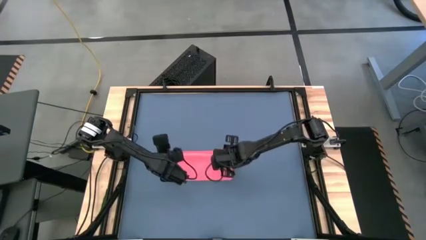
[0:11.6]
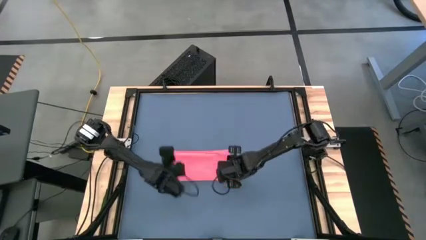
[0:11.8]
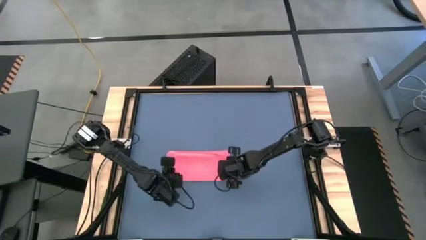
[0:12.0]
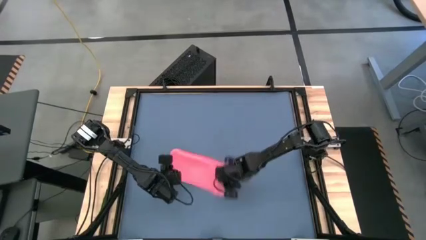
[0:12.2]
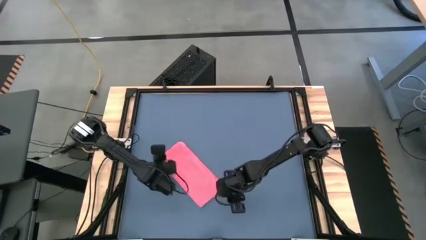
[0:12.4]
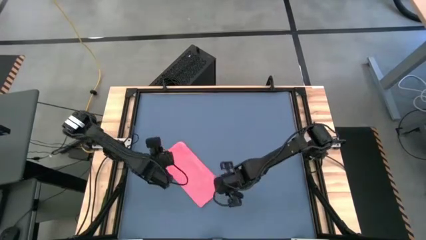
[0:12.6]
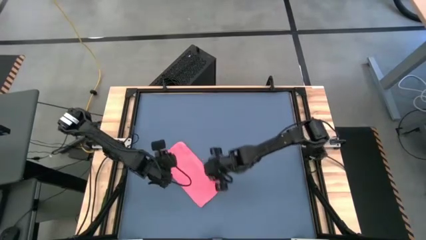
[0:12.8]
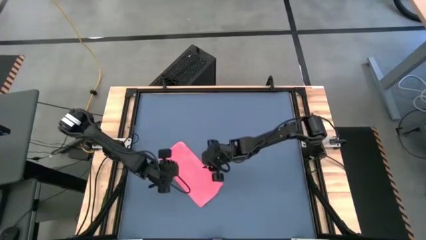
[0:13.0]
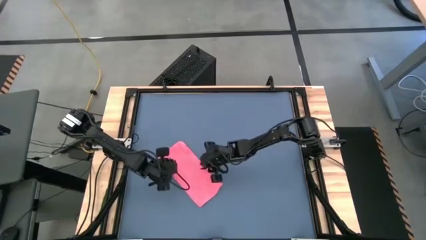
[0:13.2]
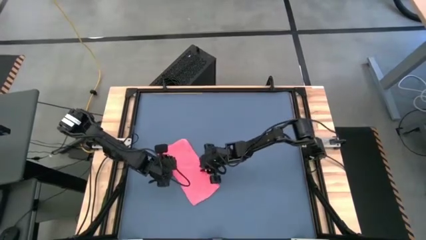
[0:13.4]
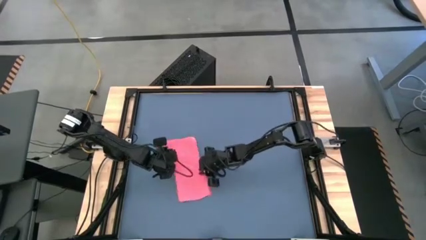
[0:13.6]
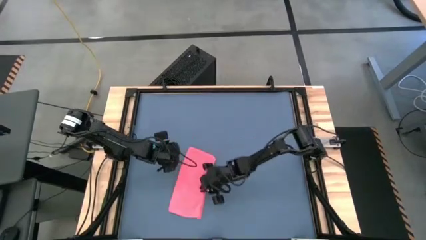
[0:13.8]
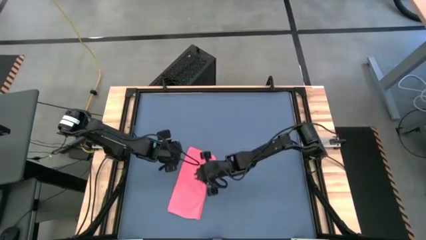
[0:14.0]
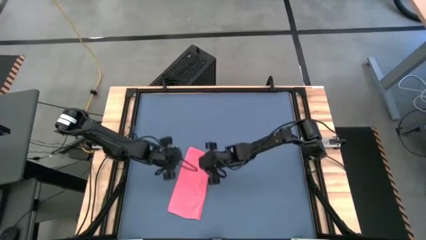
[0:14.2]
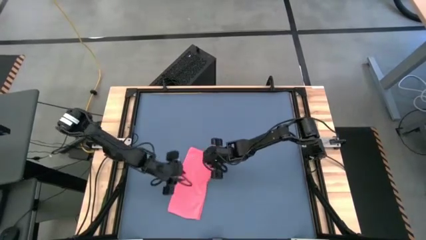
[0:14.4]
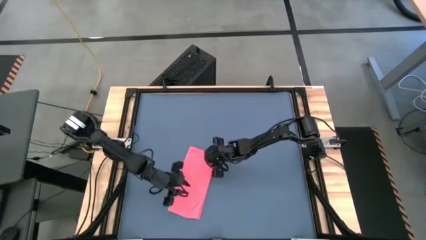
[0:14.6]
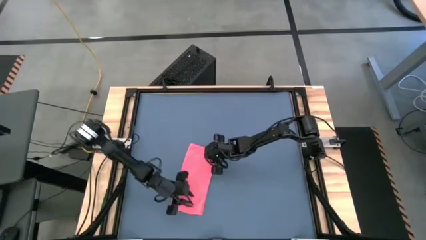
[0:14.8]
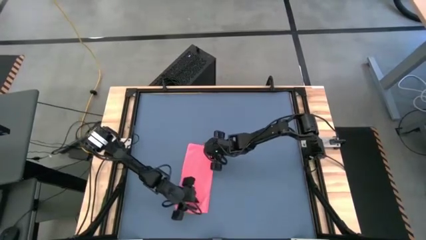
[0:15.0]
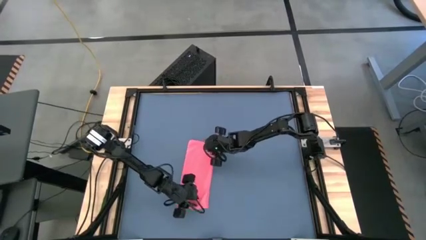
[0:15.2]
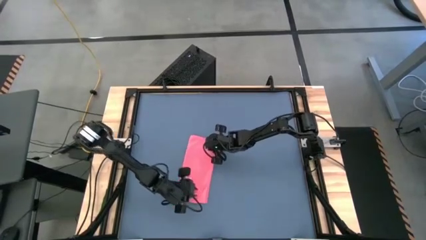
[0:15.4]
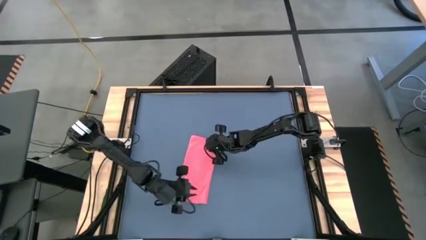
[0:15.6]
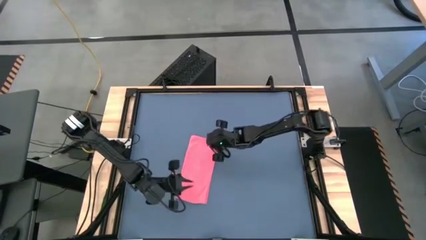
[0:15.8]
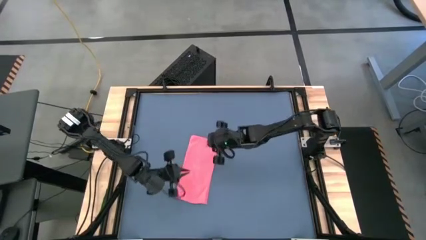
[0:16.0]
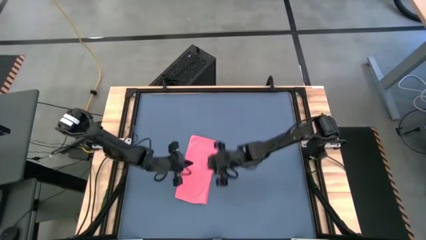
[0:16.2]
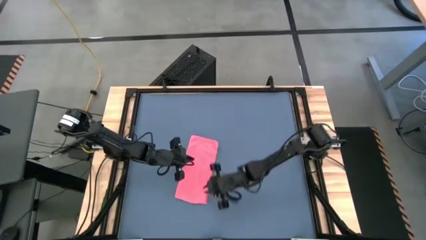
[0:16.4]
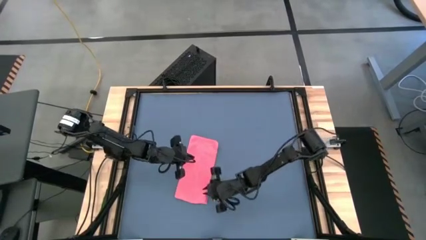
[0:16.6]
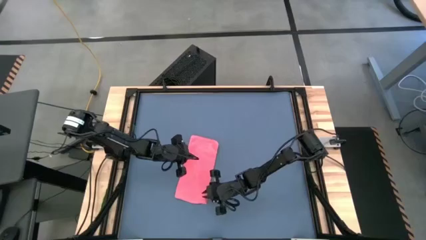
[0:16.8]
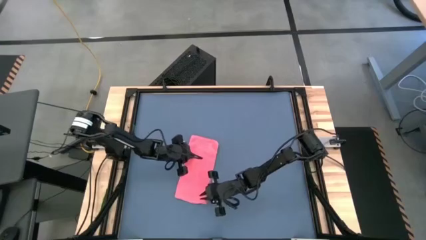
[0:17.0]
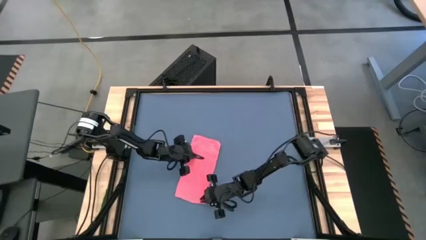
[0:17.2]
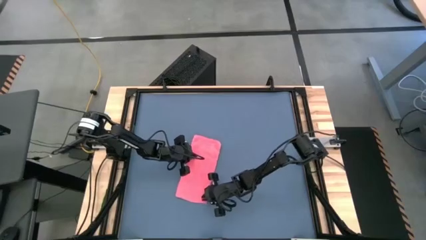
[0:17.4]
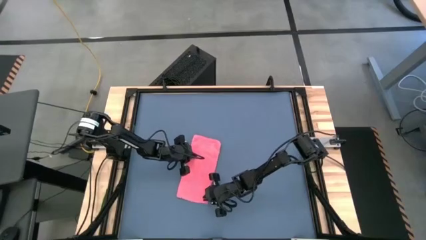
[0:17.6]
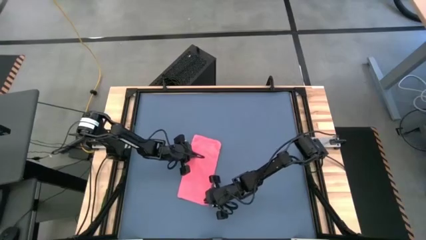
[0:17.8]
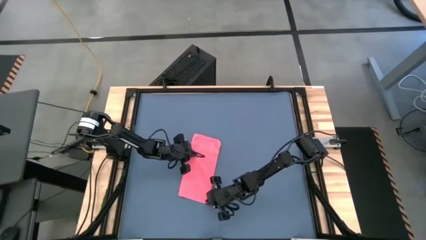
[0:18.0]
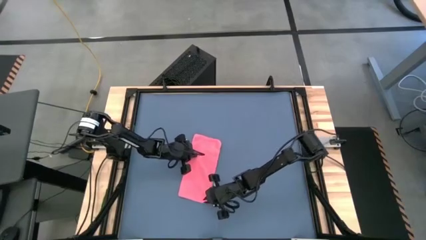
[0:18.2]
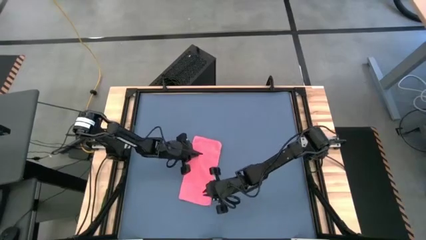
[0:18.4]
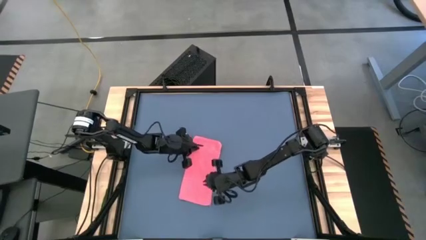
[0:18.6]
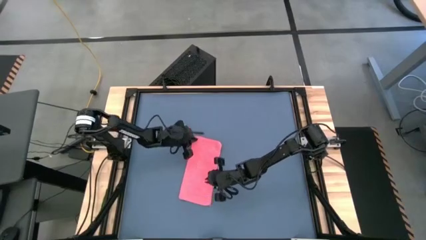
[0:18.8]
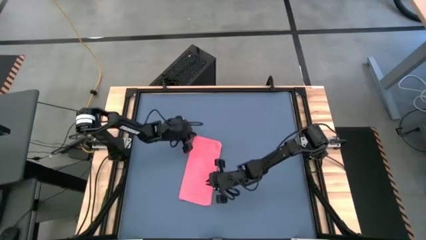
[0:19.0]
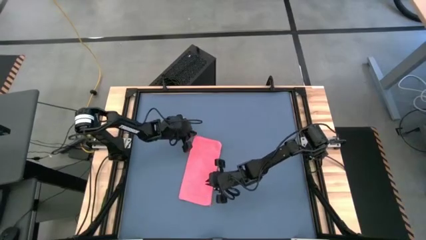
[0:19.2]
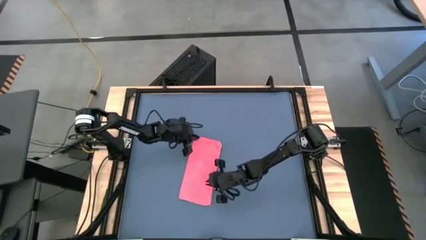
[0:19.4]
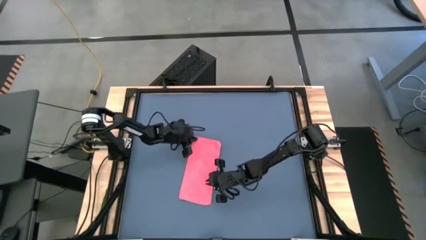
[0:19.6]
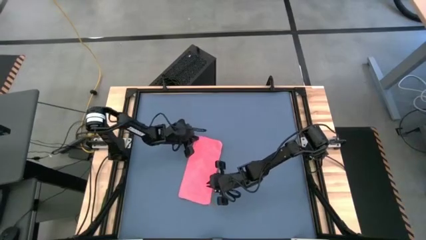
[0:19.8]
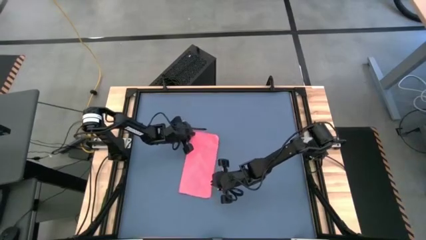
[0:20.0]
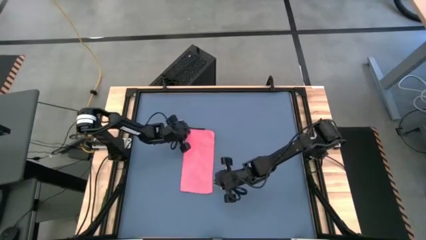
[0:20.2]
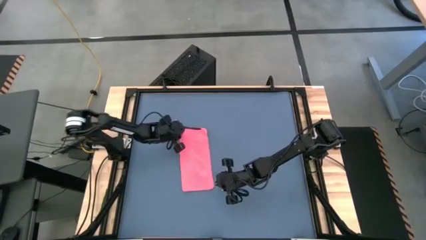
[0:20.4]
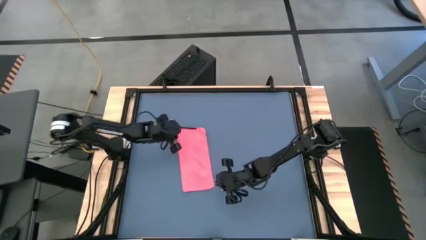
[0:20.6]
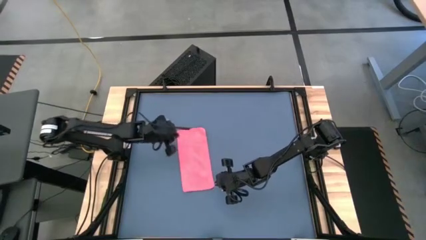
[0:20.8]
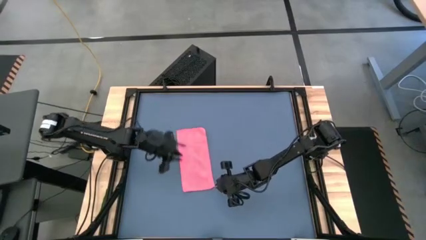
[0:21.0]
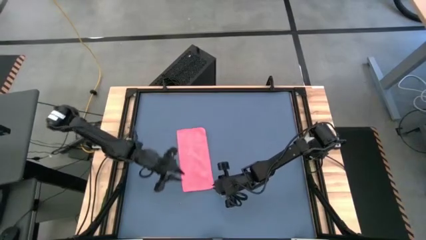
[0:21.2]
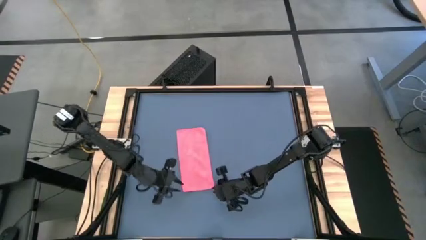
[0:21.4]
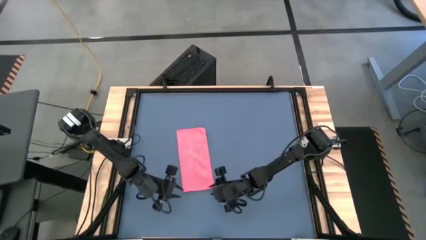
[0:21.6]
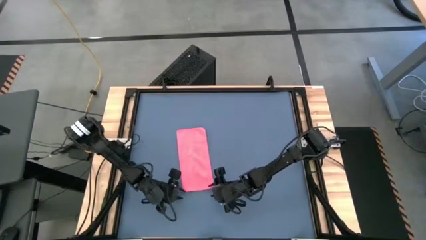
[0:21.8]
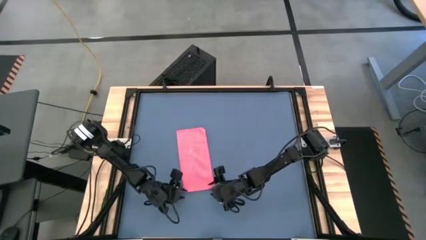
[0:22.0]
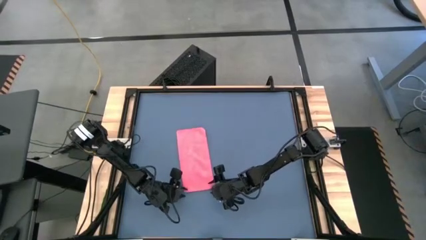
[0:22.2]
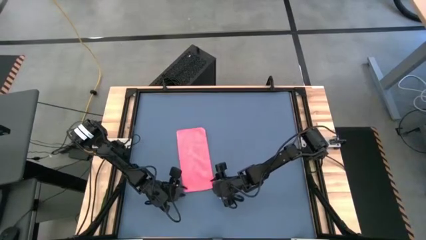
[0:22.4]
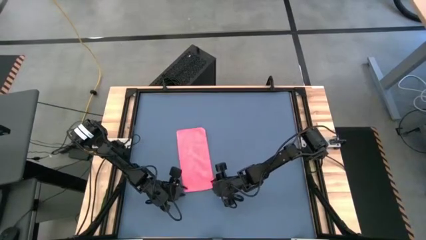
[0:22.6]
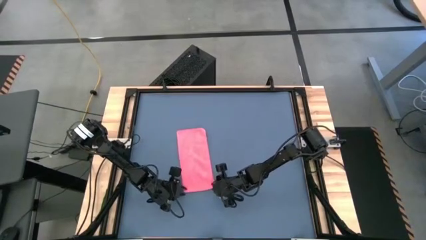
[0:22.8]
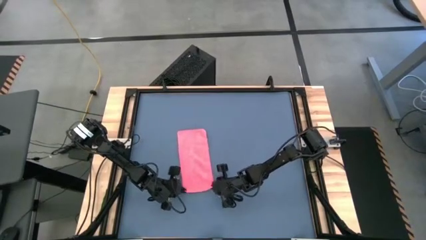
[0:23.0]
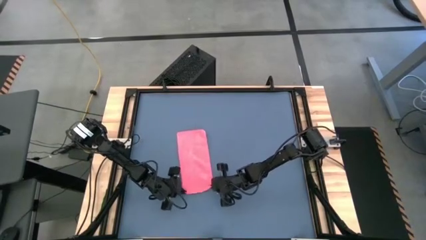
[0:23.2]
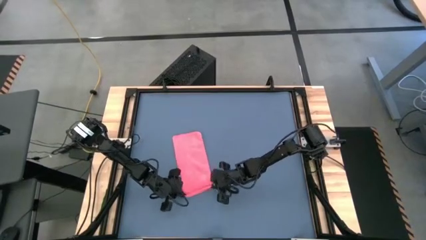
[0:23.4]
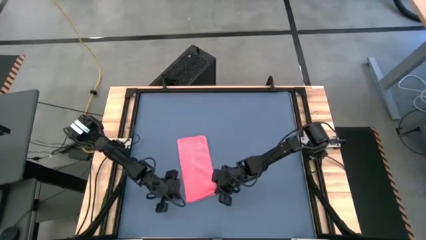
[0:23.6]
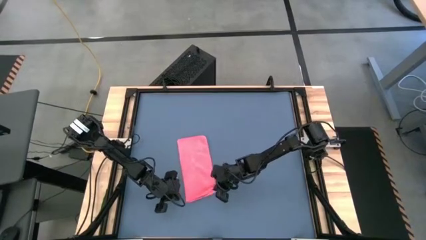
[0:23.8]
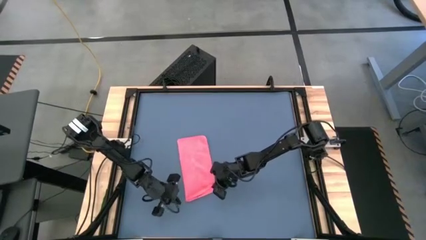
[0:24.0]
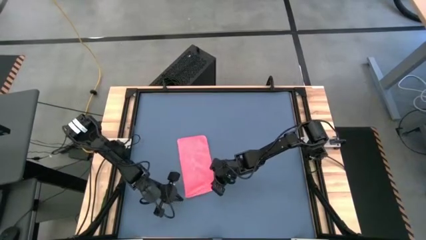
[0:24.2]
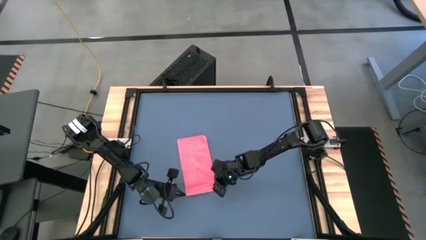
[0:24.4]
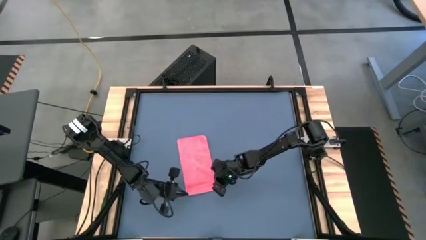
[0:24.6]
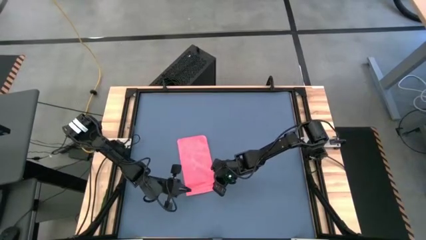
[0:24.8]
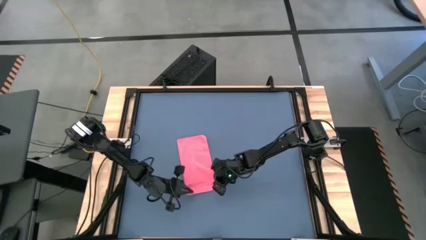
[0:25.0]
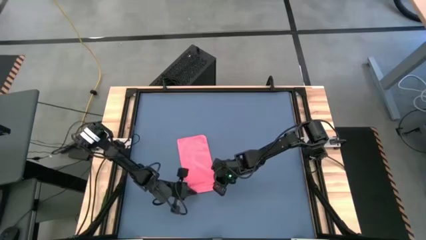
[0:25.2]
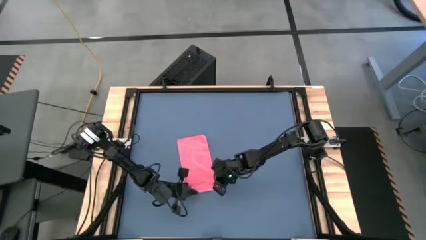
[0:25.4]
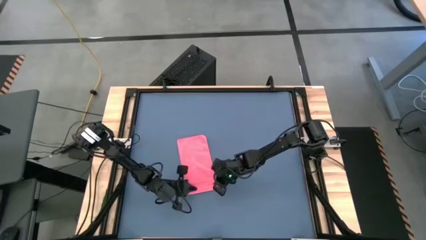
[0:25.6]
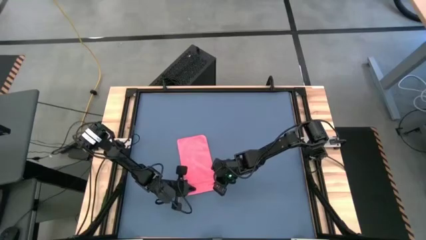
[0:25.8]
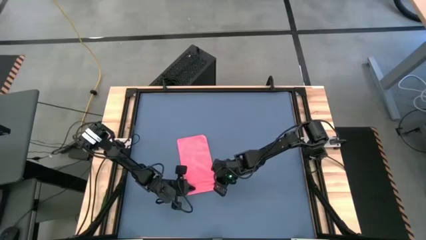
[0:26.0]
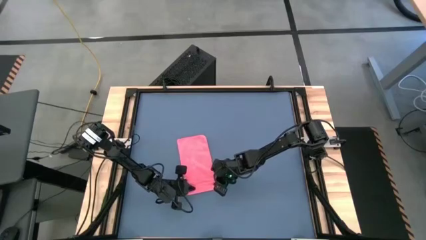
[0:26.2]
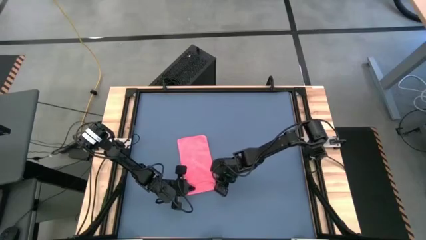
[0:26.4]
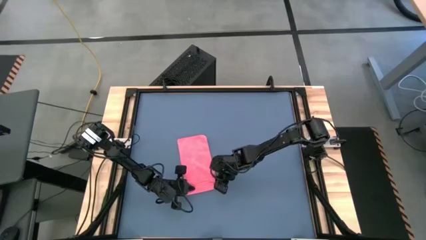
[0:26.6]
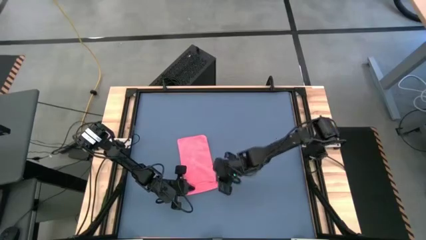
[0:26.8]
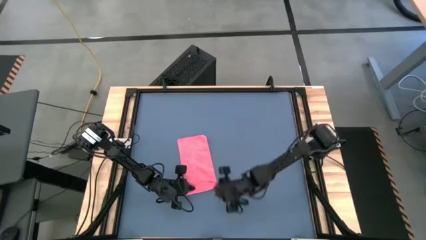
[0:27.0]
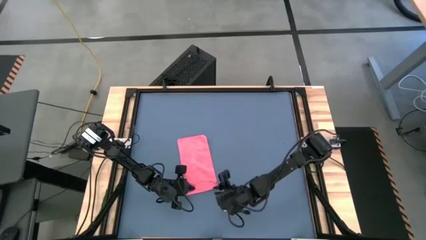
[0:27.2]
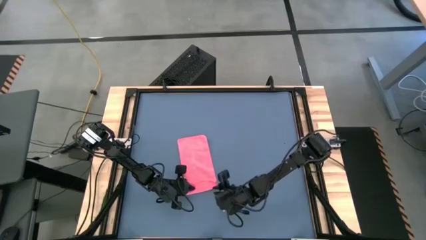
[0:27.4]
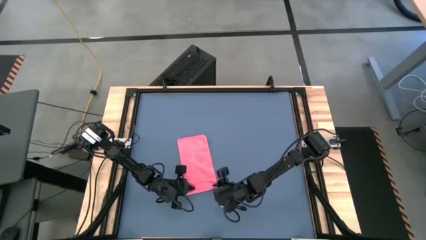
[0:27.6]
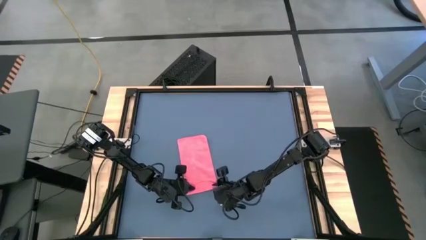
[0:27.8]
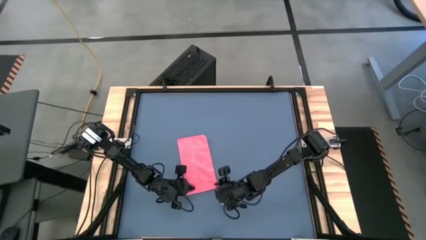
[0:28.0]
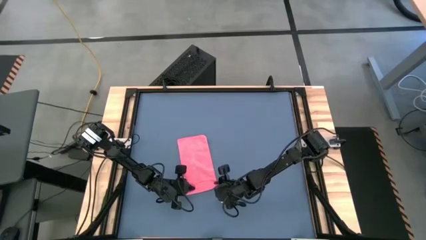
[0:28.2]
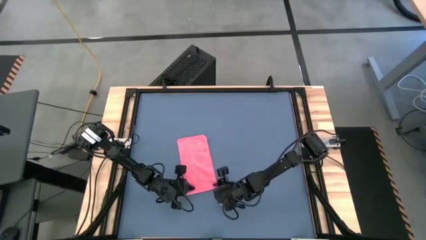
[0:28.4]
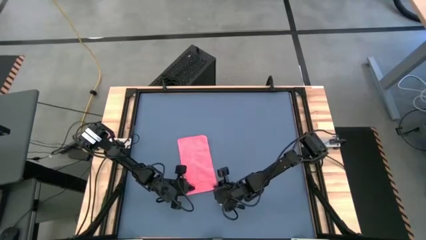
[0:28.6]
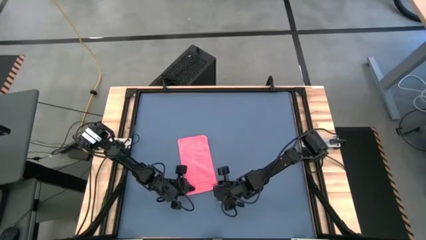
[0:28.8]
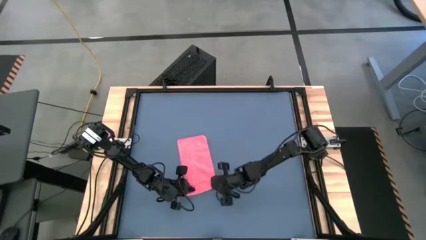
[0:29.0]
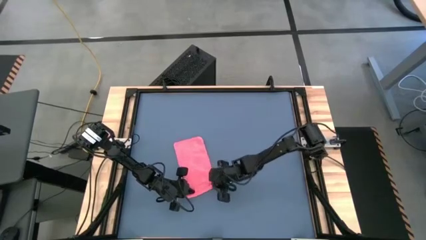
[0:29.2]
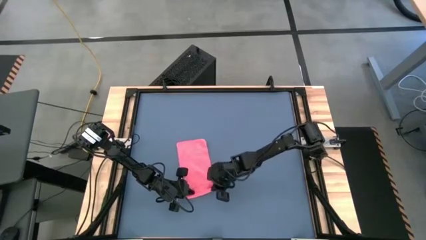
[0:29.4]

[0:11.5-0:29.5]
Task: Roll towel into tight, uniform cylinder
Roll the red towel
